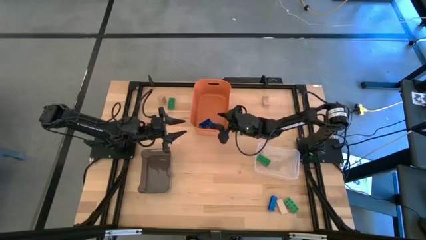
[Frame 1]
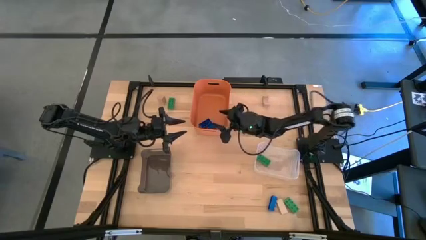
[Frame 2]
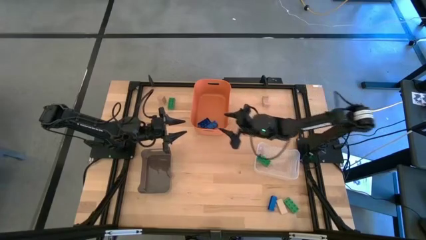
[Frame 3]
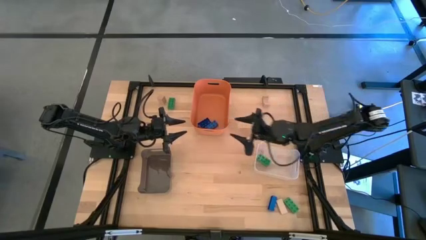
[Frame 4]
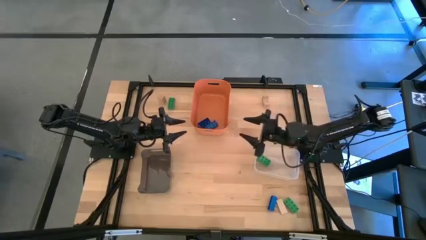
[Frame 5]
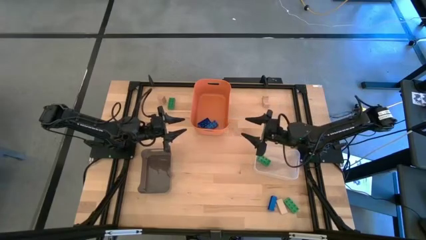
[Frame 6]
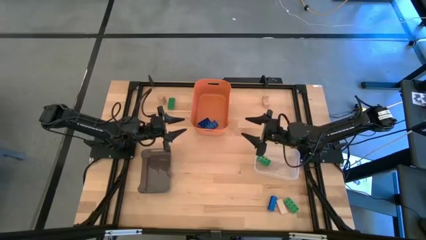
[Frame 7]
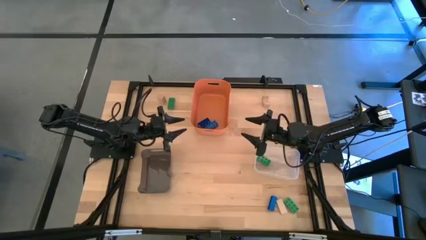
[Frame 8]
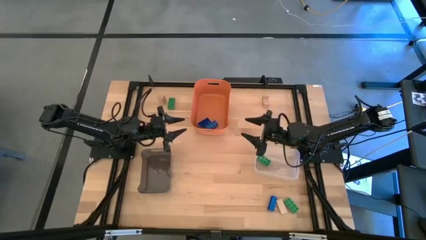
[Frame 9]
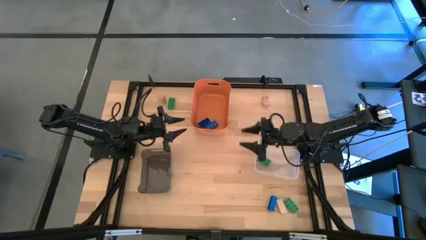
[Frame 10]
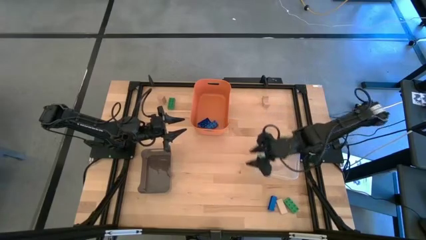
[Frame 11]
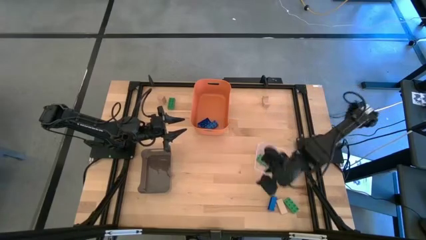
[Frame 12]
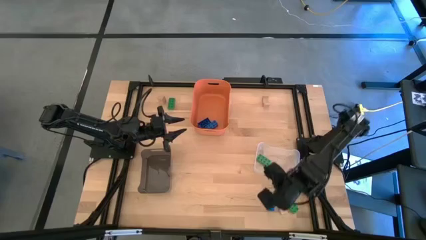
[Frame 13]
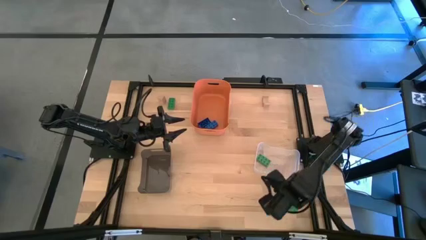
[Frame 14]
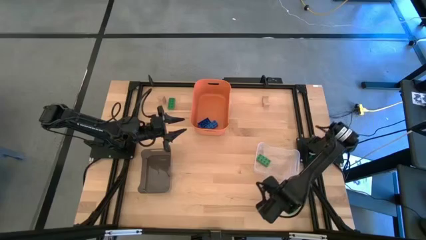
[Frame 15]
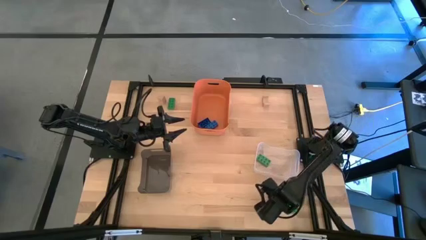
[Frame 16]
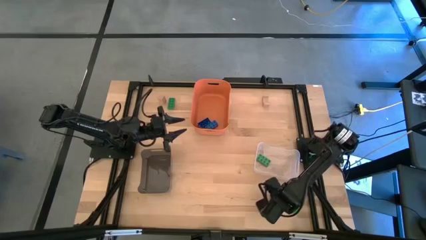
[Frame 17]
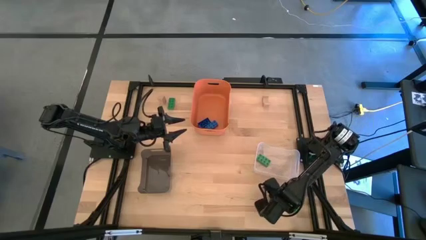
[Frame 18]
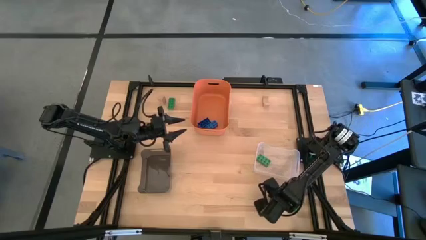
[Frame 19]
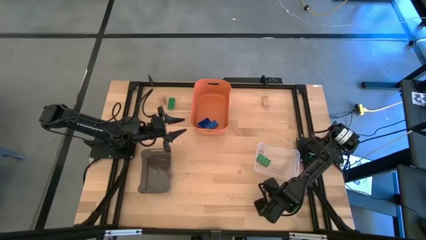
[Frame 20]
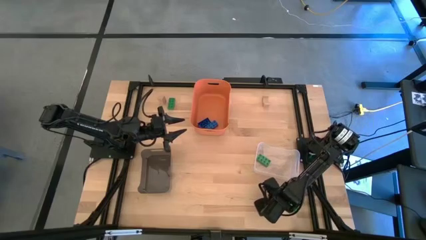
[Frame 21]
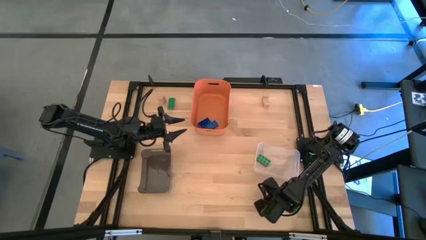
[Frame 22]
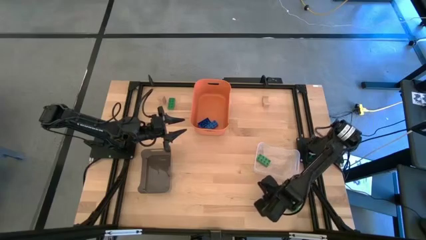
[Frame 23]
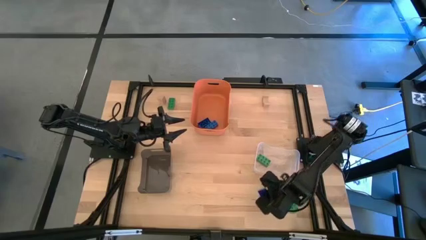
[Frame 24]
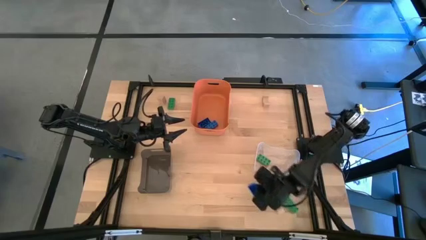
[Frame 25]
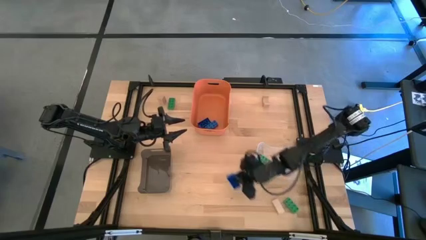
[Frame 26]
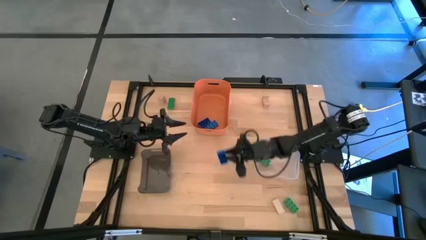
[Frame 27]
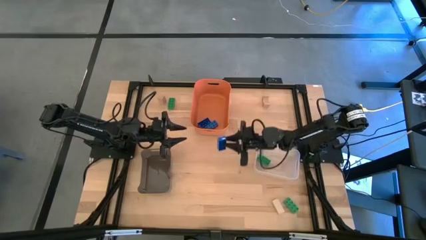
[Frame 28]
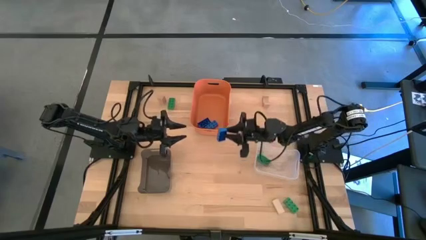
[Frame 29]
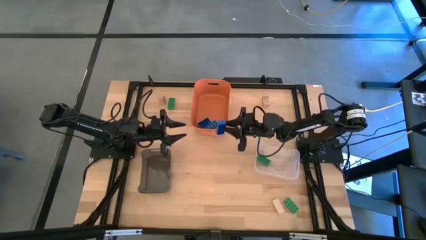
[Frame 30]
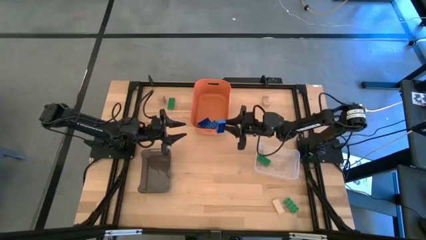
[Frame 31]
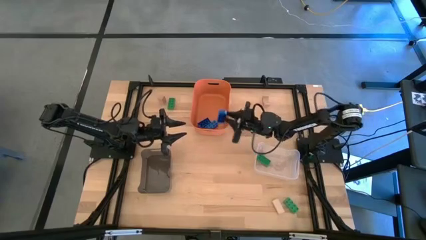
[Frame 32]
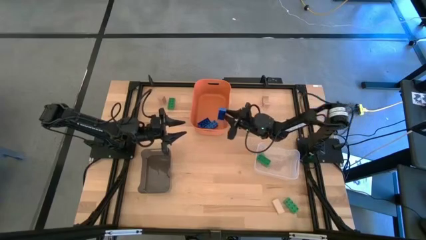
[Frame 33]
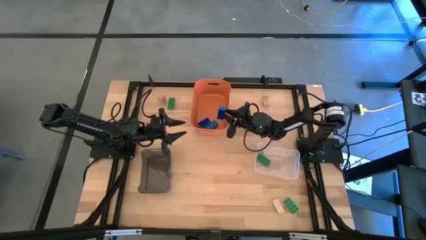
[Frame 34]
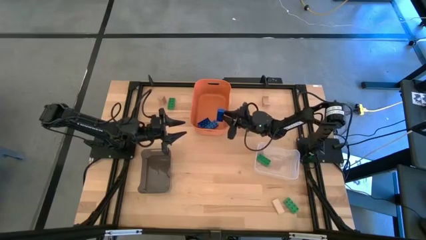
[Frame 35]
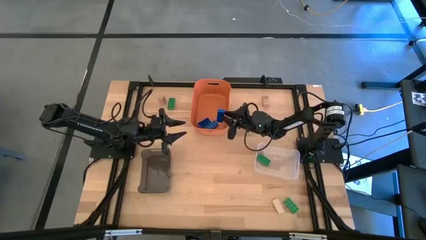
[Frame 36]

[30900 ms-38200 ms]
Task: Sort & place blocks by color
Put the blue game piece into the orange bin

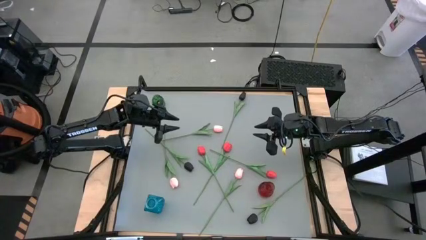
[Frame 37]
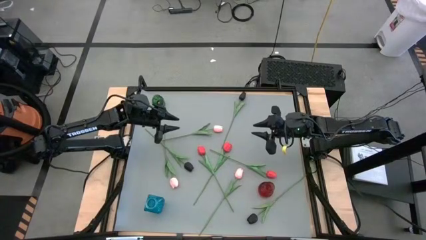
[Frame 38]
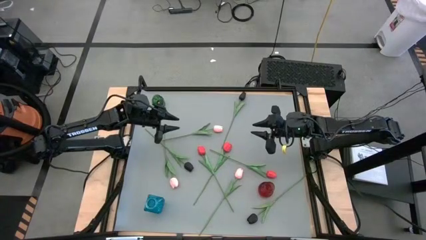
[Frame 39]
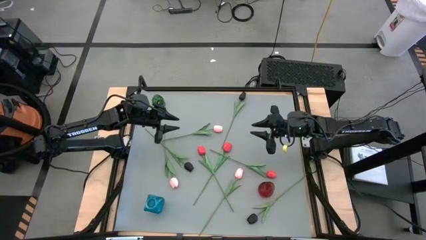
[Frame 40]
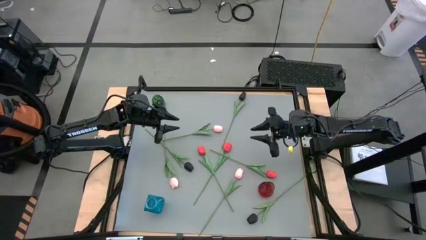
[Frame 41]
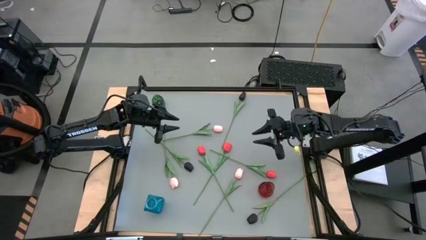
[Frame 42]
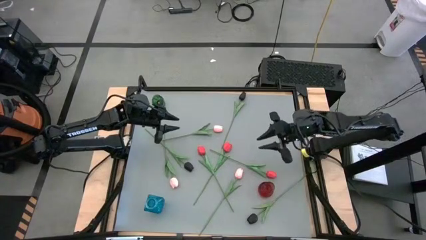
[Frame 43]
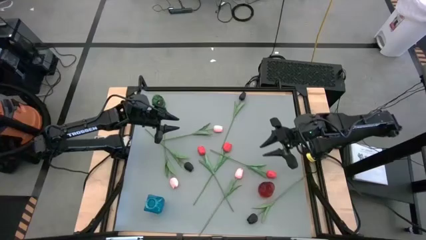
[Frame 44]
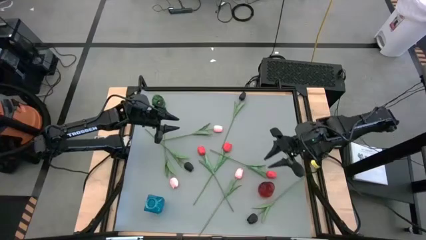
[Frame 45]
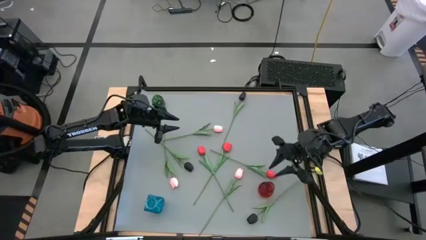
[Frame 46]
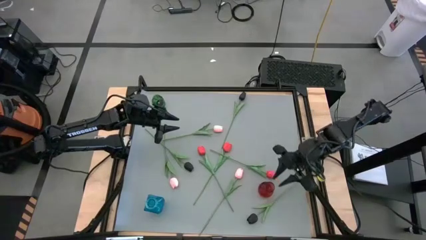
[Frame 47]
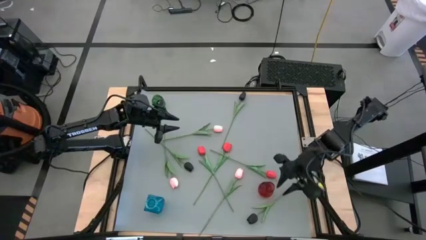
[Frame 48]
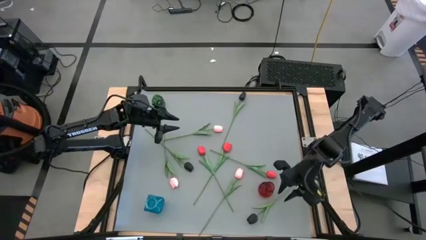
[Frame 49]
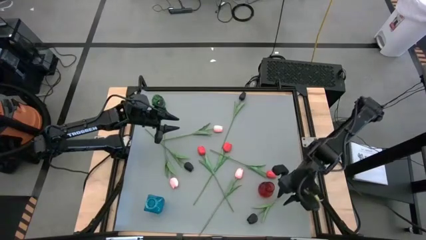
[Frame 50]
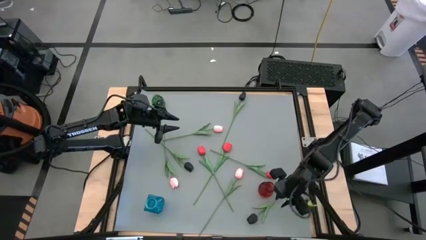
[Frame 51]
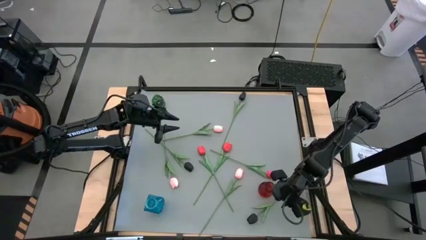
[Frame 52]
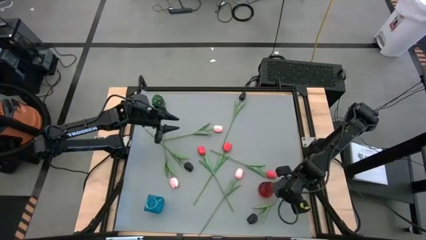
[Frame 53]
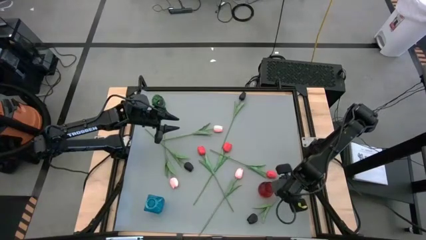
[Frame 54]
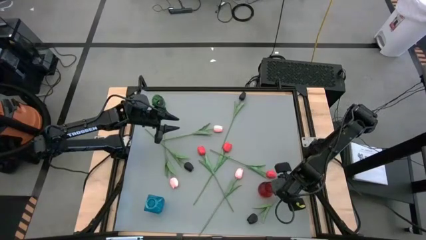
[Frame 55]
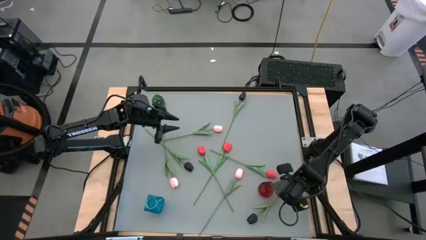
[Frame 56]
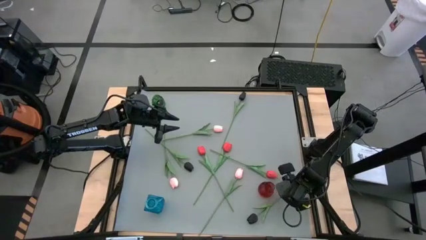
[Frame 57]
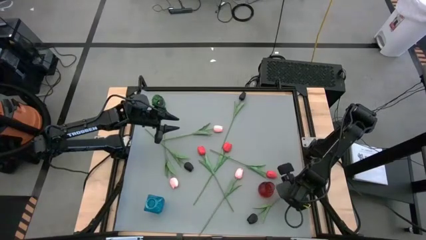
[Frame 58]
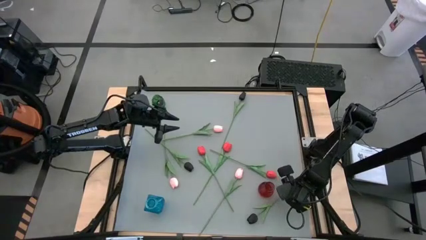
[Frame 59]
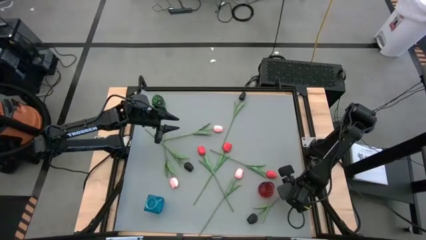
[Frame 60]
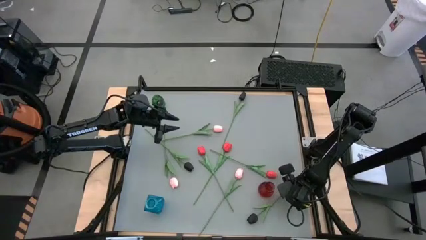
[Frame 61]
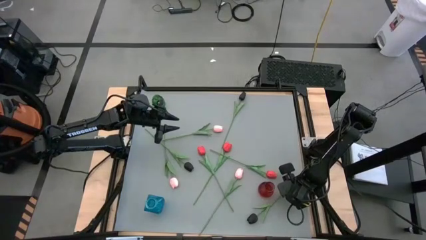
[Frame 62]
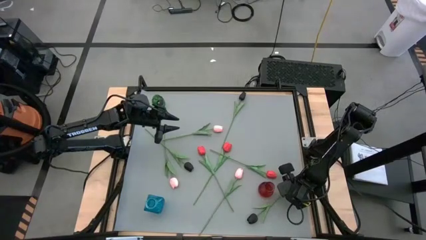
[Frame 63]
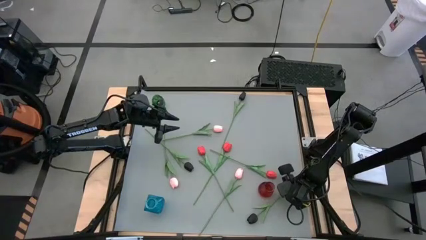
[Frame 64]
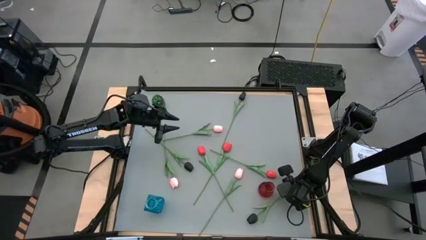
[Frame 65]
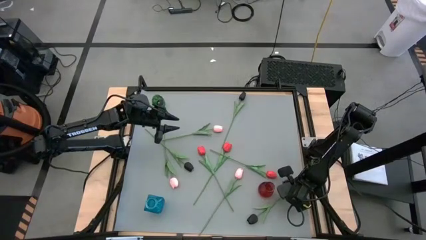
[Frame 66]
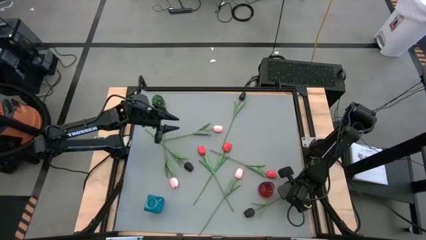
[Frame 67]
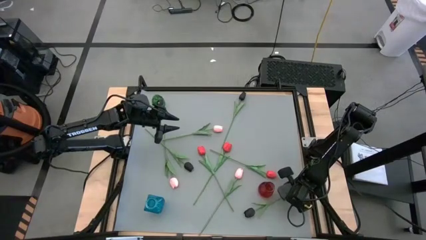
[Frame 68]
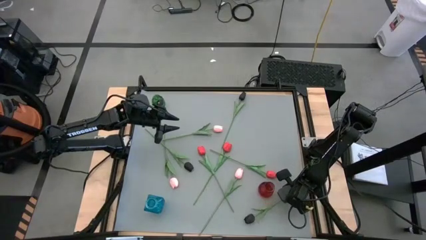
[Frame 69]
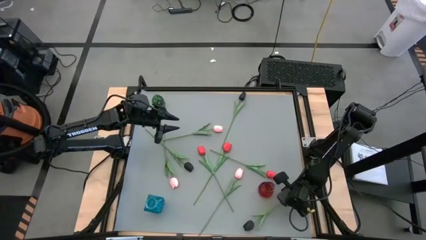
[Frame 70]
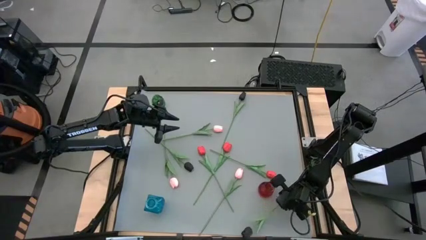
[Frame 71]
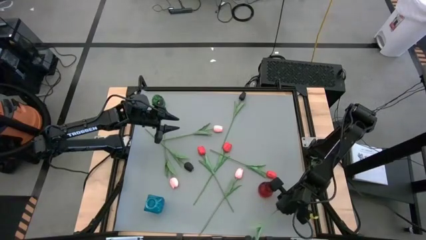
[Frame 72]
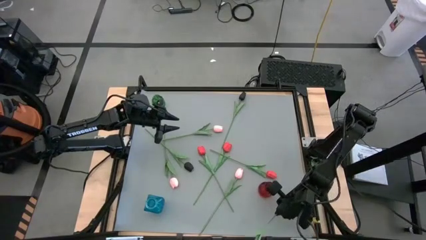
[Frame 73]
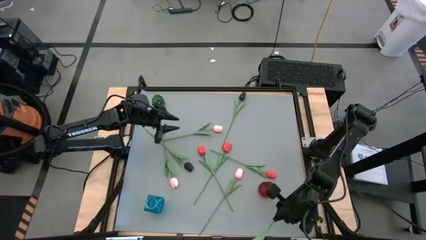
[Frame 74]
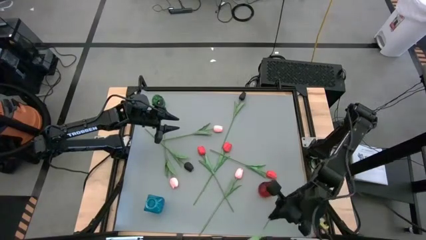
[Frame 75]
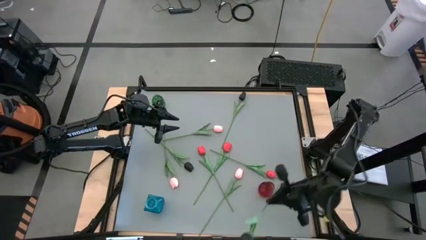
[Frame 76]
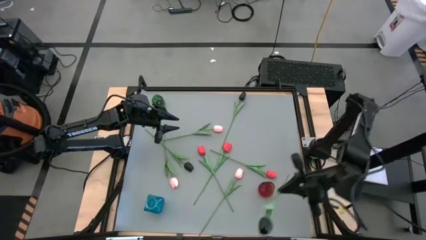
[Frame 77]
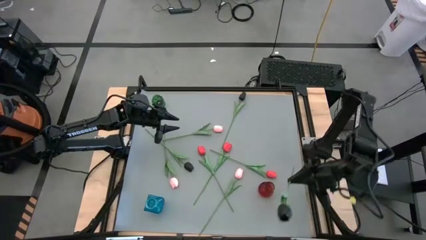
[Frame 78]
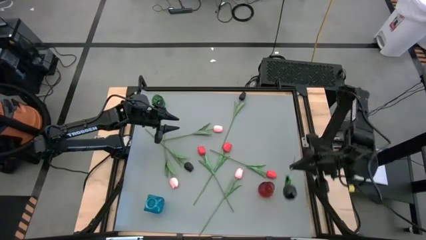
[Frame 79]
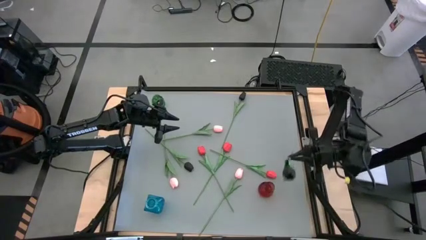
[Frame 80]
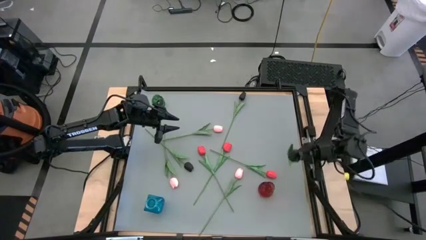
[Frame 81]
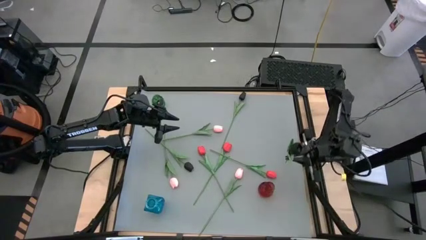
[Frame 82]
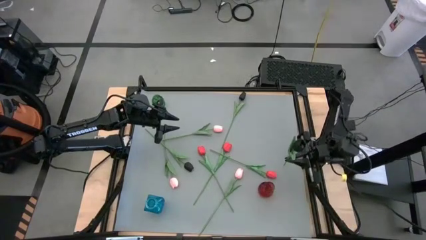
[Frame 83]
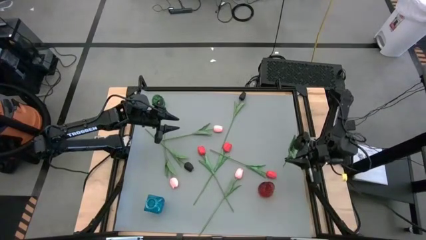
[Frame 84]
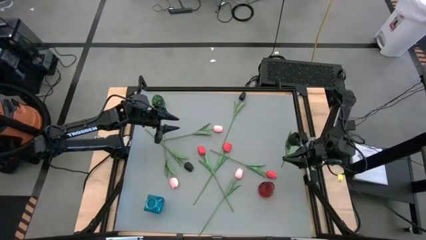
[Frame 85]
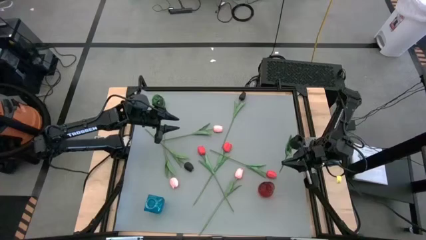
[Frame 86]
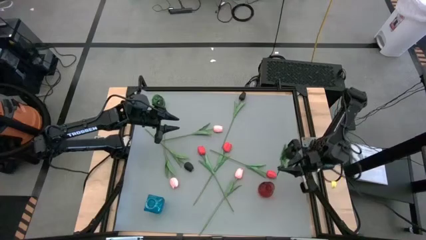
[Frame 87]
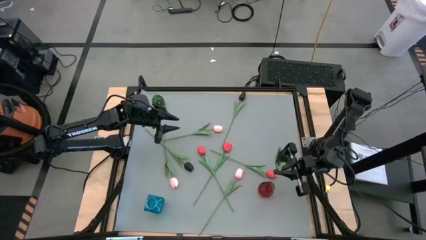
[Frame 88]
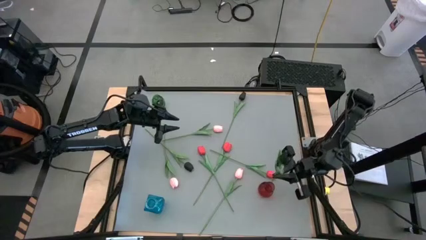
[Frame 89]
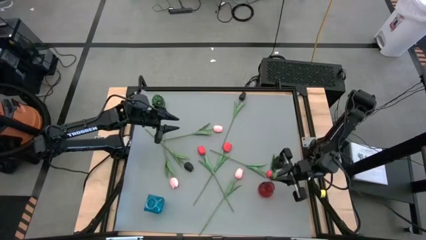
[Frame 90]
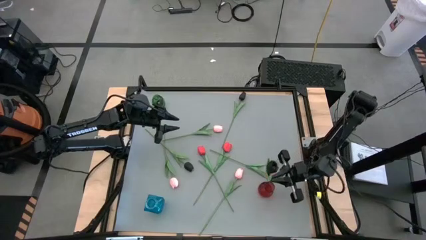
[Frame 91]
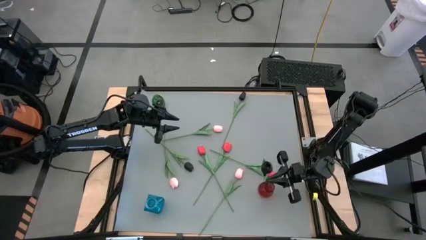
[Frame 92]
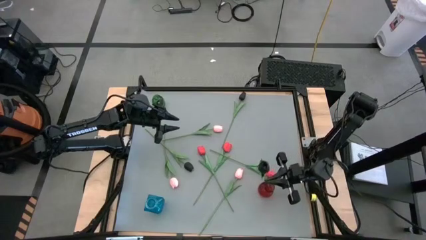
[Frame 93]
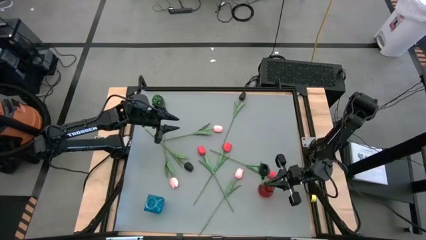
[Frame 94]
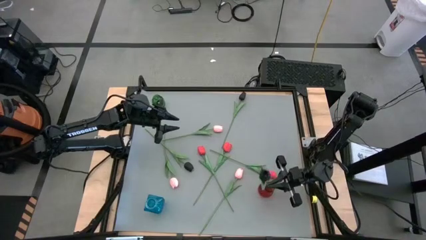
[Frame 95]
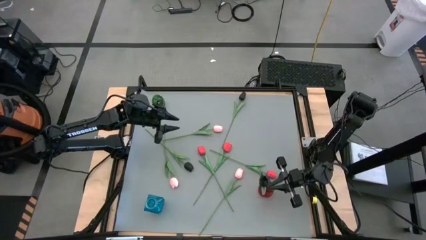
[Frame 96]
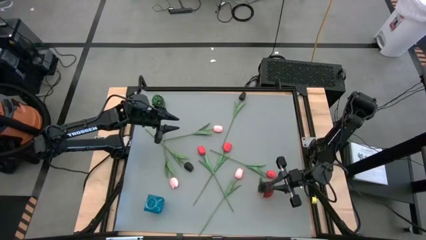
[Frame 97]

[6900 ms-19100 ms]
Task: Sort flowers into vase by color
Put the bottom right black flower into the red vase
